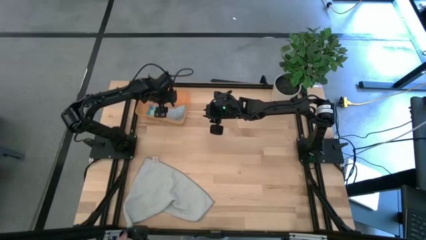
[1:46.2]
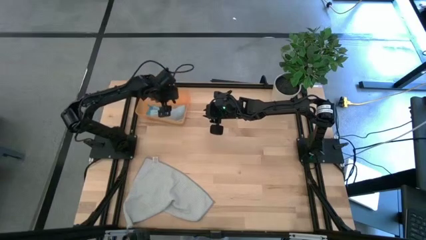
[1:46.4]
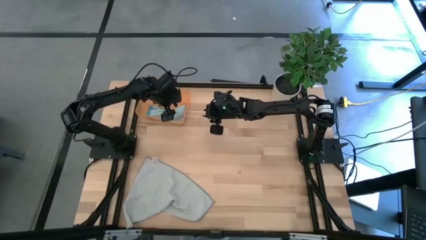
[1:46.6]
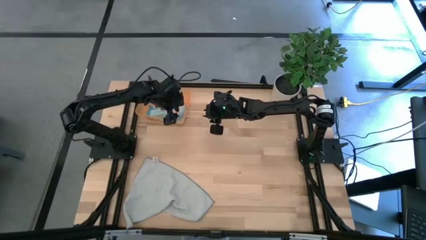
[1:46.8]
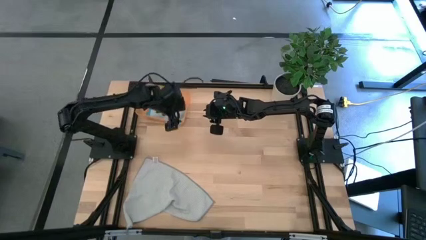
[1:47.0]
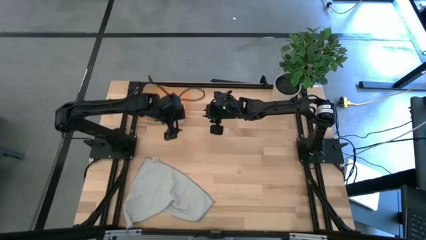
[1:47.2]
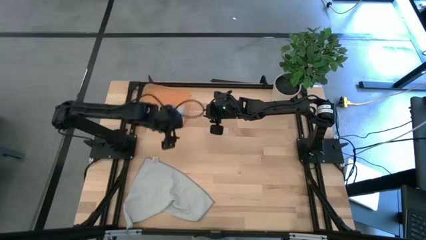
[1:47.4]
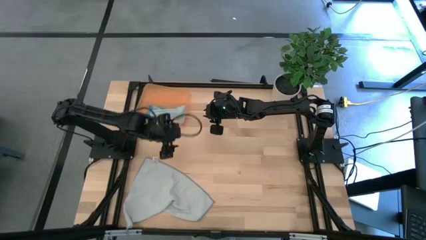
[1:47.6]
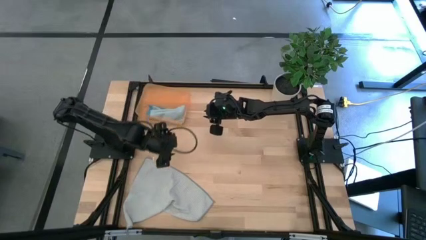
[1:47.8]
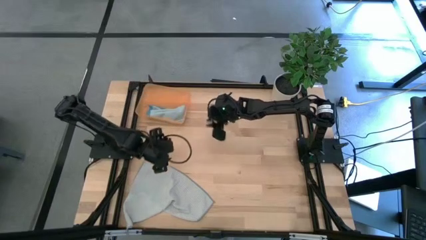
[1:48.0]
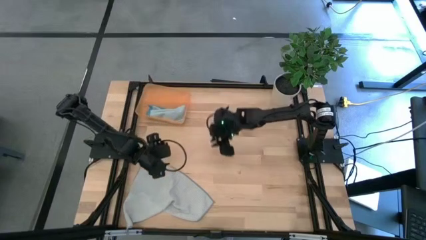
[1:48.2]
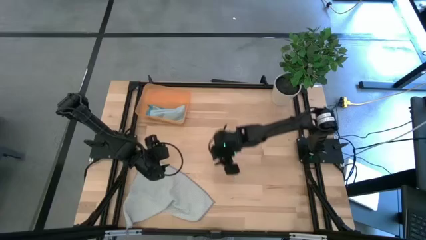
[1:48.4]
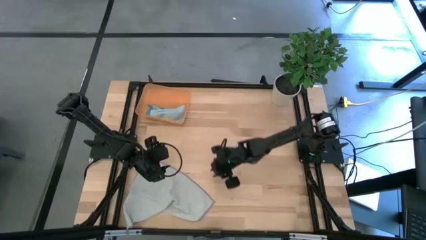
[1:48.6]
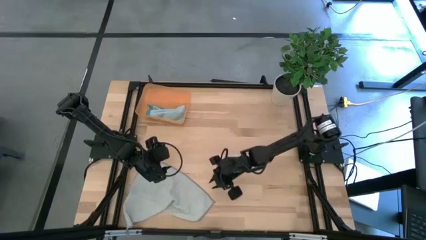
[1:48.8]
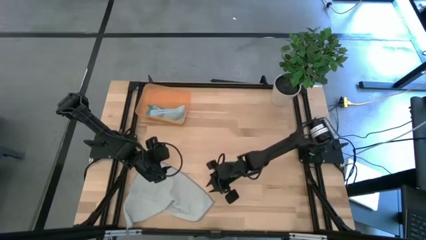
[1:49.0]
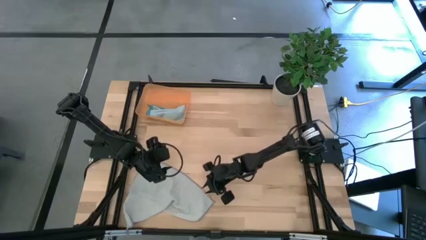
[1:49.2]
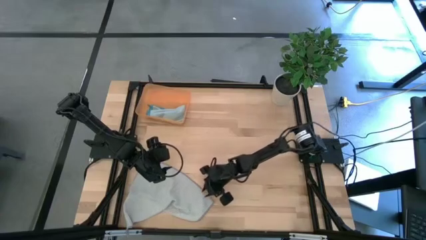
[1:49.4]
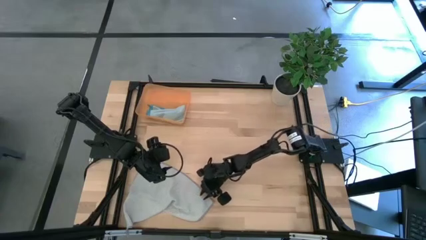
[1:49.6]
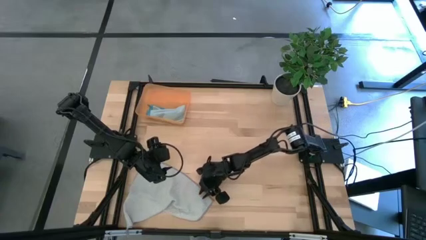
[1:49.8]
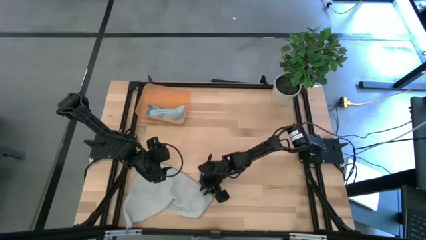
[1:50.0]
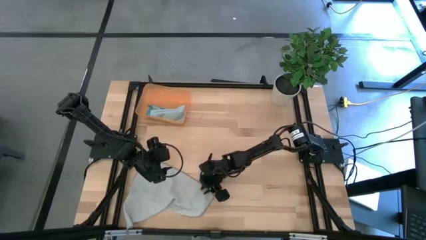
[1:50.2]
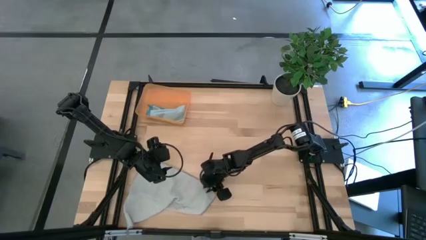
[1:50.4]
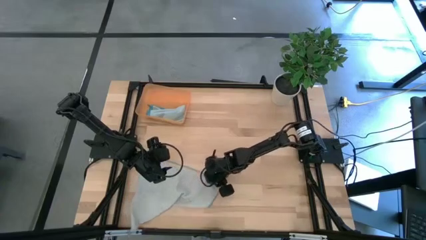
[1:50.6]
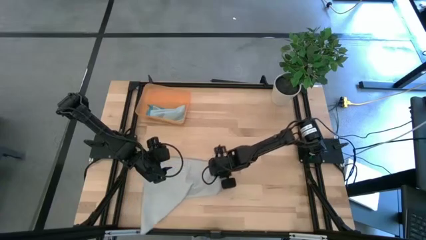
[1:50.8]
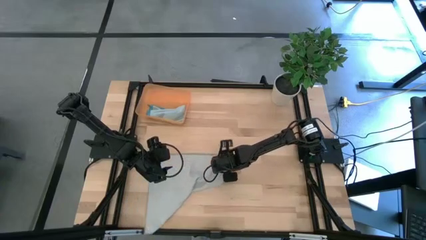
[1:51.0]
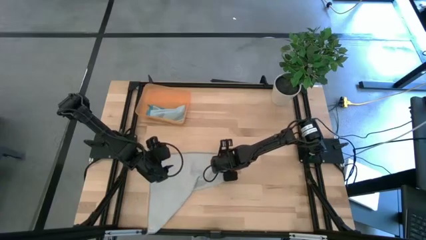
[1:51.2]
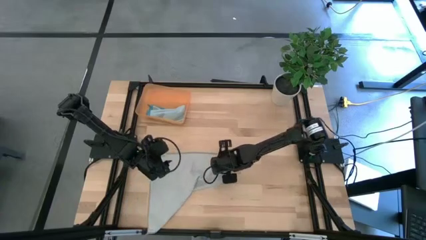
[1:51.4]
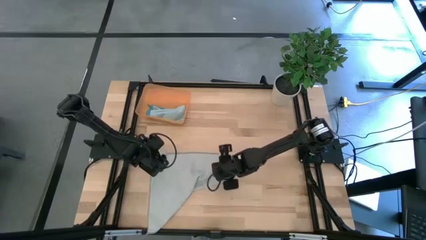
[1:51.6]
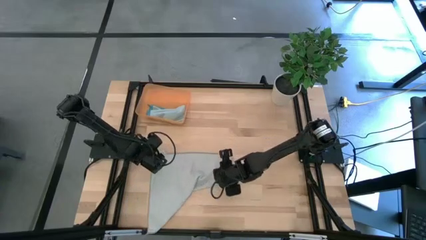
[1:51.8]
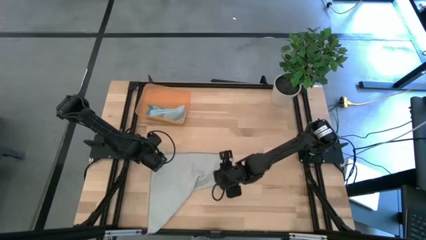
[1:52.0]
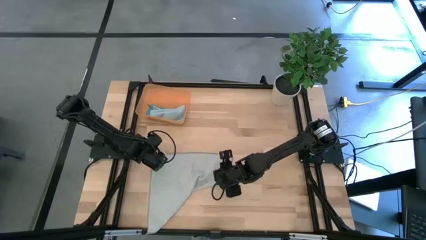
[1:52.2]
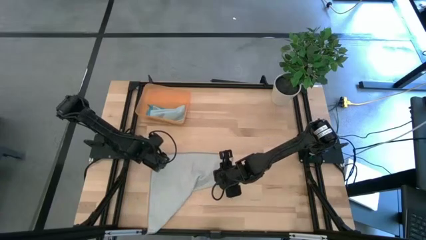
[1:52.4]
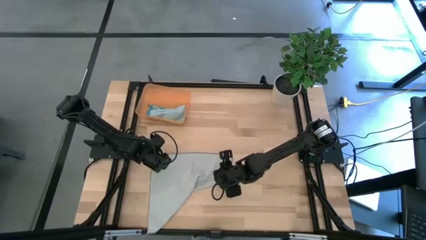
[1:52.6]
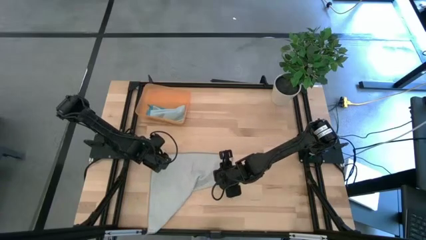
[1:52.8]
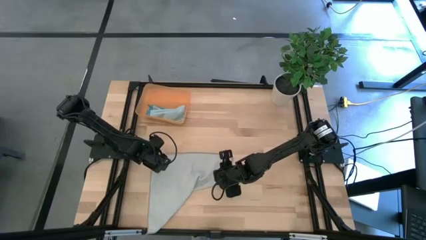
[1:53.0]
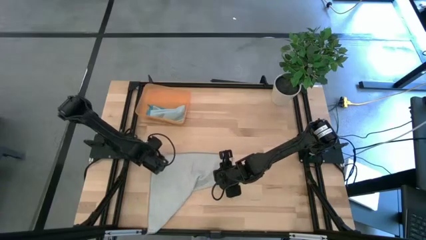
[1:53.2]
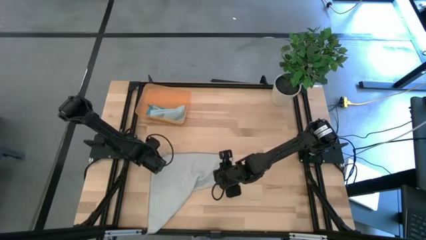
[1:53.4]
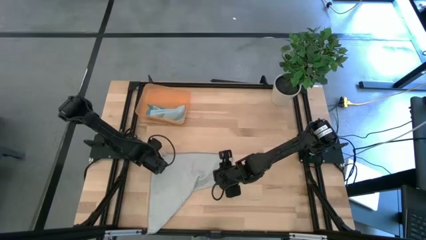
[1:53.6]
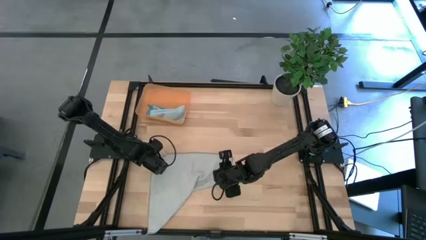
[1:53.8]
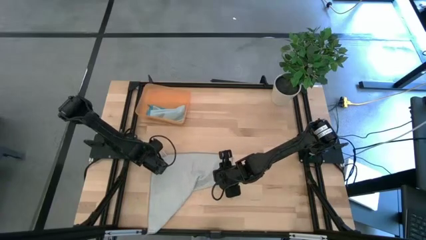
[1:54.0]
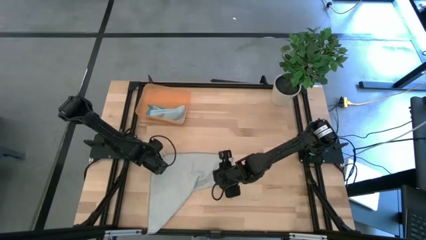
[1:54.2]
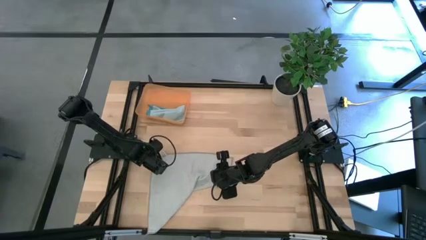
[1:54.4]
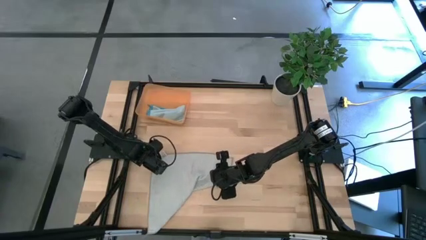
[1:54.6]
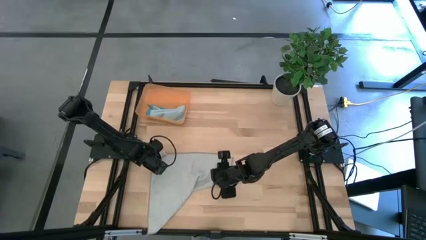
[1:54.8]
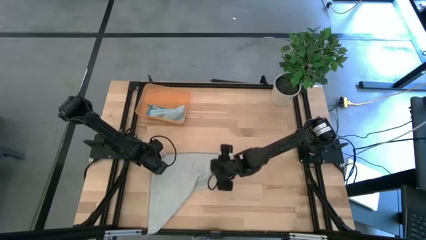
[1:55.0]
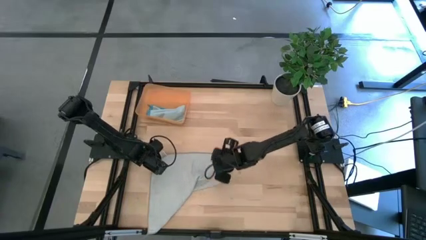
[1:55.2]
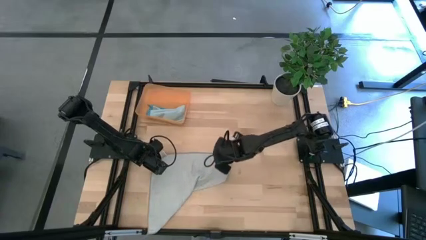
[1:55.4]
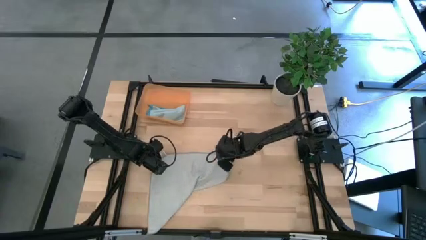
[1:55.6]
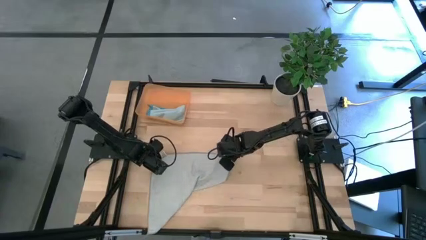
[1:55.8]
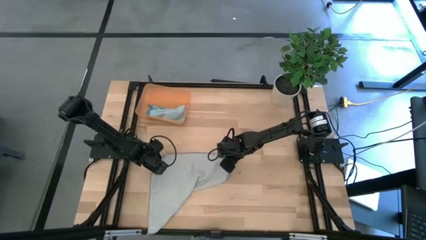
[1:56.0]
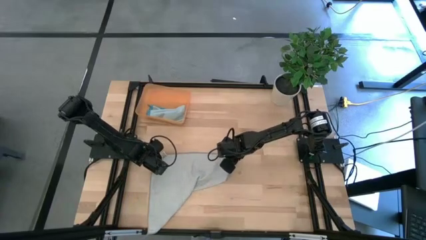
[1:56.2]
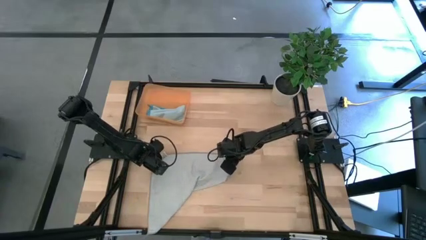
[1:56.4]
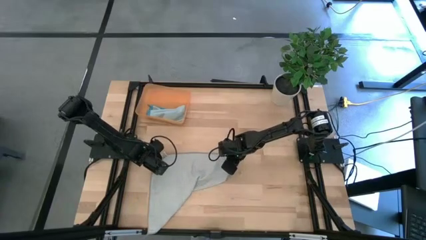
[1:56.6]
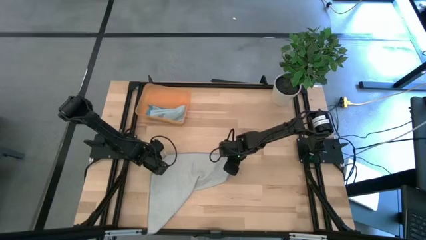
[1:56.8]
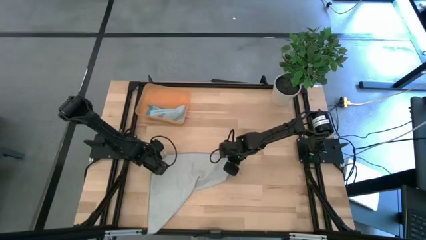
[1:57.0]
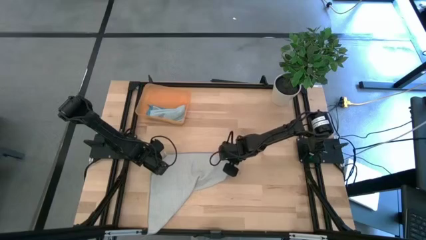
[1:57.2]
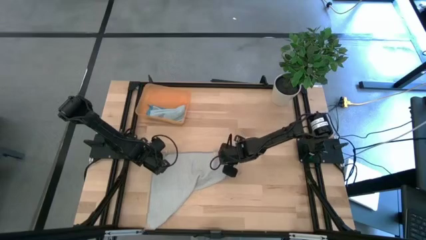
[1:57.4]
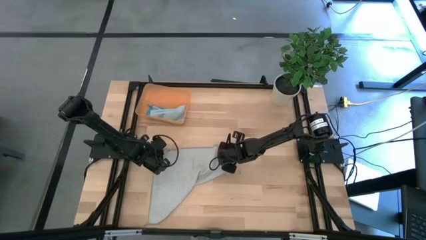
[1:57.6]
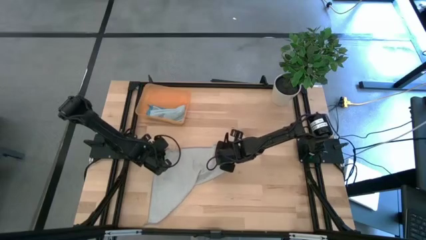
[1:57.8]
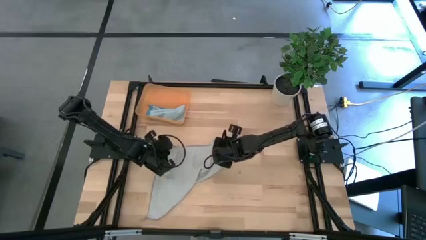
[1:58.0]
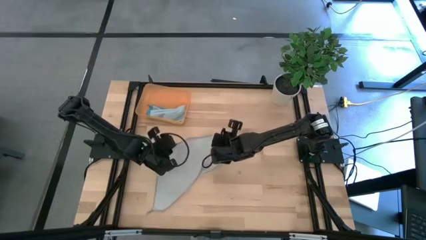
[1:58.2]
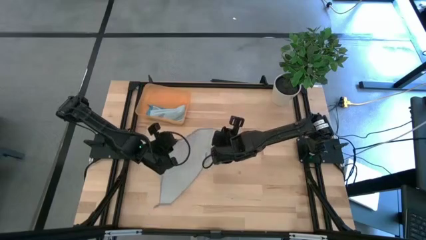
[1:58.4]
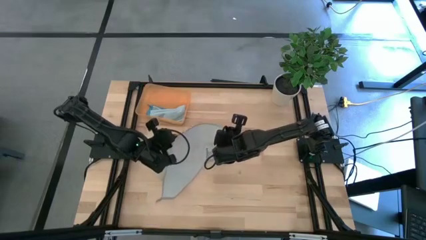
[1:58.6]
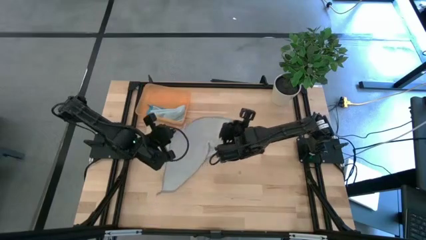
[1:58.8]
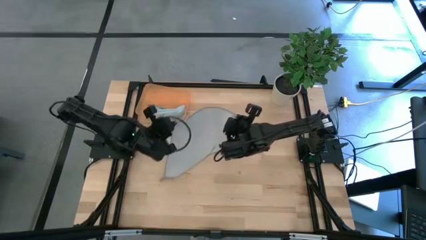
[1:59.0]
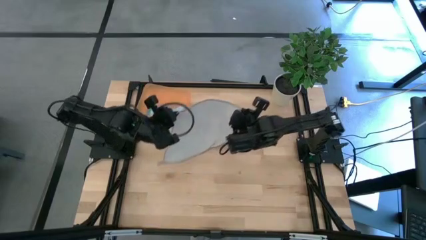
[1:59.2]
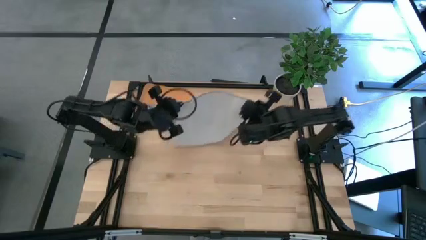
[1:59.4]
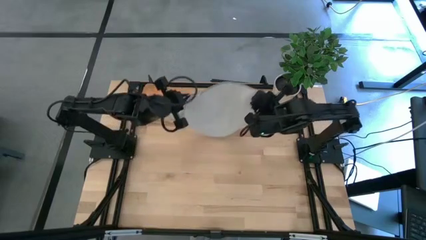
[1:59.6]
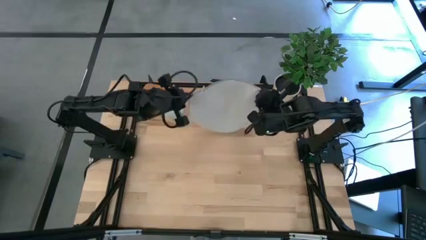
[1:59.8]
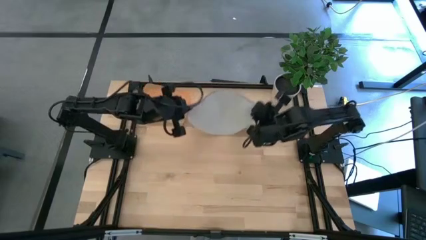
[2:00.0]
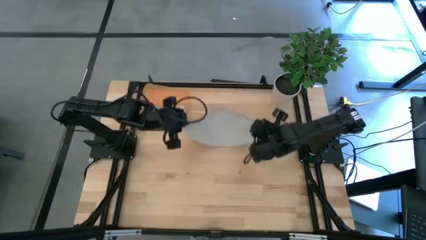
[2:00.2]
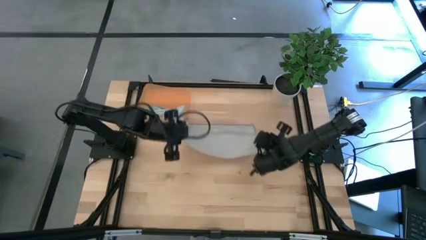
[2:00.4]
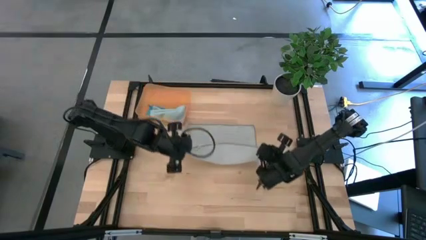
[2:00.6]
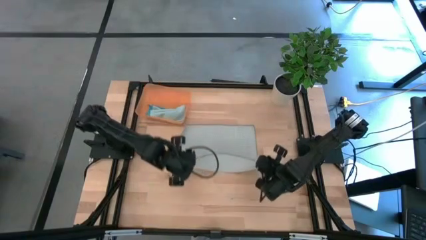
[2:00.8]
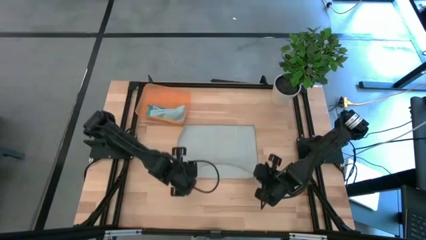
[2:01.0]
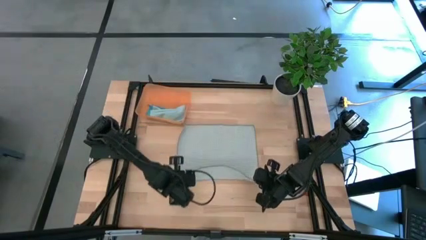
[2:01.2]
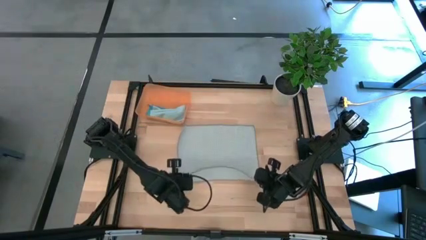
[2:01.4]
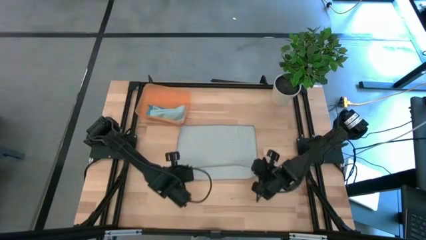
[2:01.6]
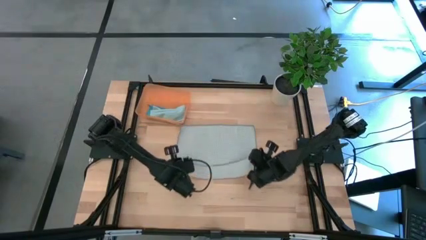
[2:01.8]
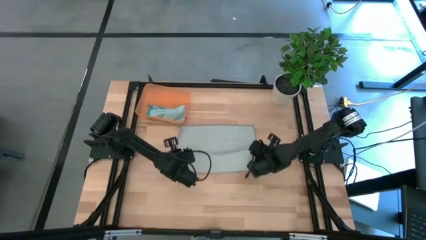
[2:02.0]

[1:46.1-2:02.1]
Task: Roll microfiber towels into tight, uniform cylinder then place into a basket
Fold the gray microfiber cloth
